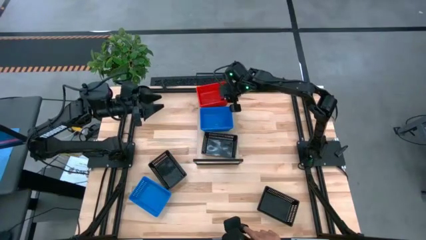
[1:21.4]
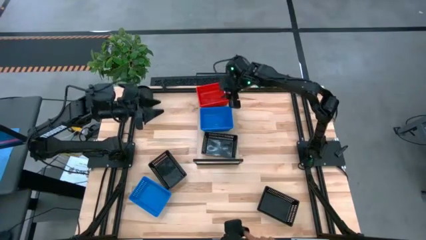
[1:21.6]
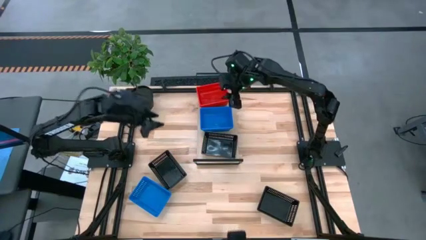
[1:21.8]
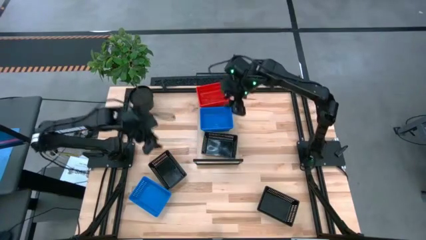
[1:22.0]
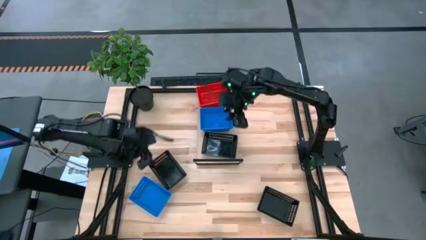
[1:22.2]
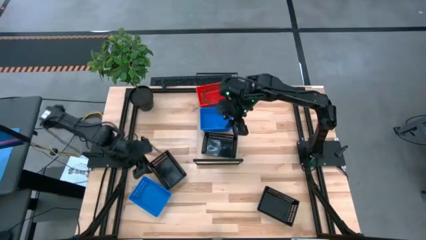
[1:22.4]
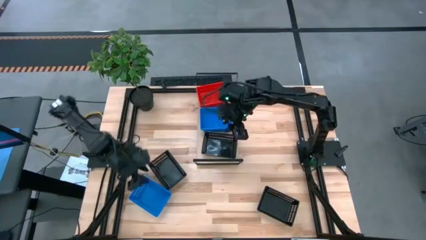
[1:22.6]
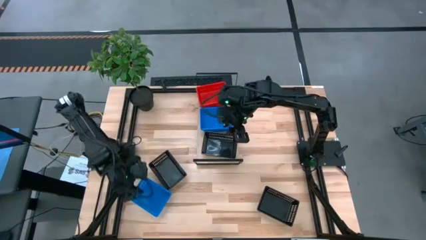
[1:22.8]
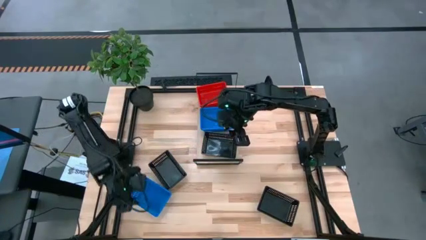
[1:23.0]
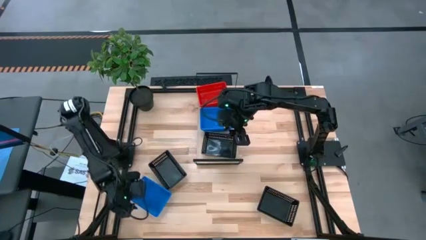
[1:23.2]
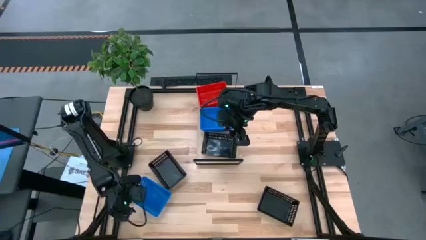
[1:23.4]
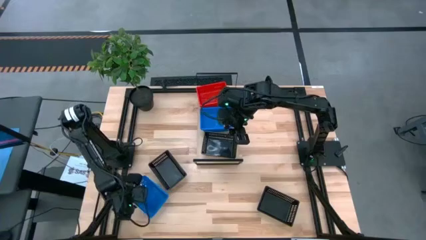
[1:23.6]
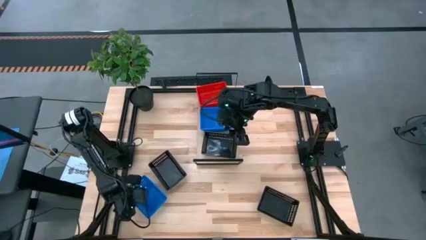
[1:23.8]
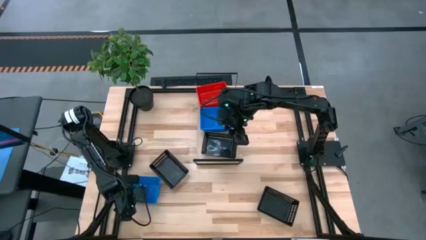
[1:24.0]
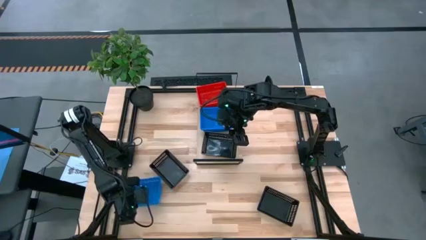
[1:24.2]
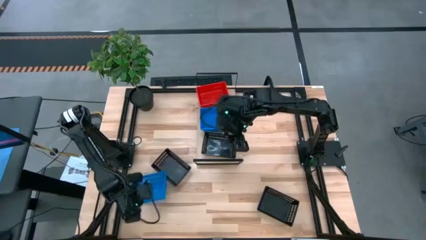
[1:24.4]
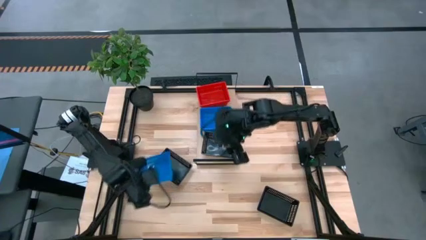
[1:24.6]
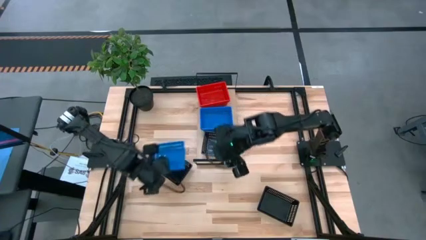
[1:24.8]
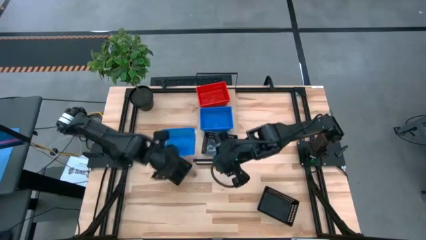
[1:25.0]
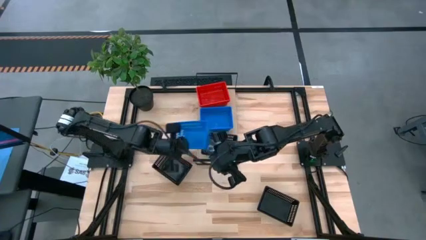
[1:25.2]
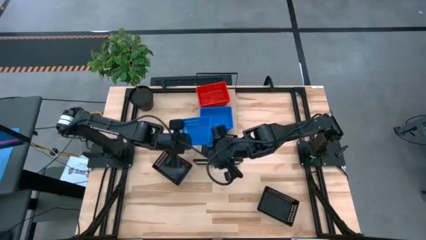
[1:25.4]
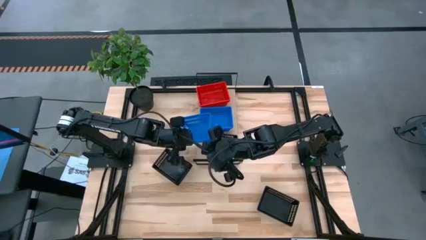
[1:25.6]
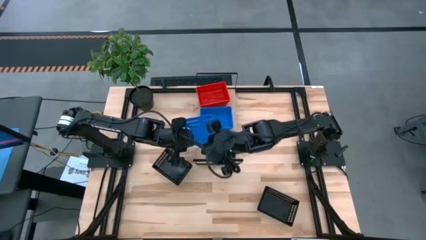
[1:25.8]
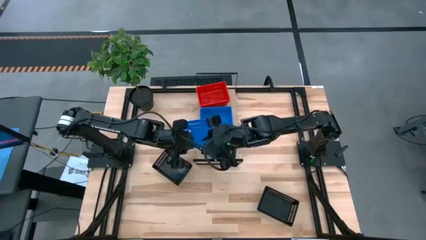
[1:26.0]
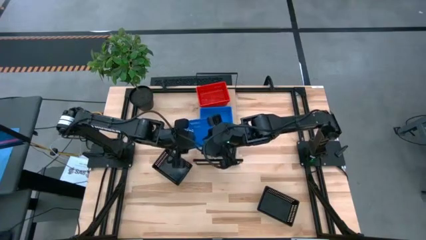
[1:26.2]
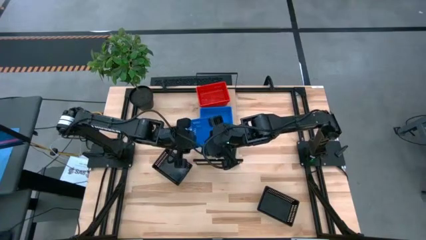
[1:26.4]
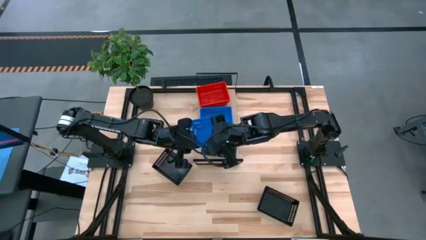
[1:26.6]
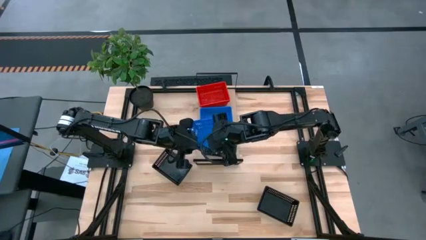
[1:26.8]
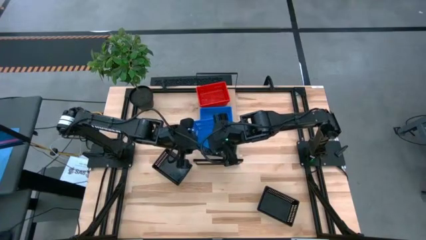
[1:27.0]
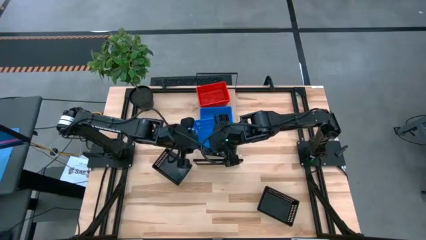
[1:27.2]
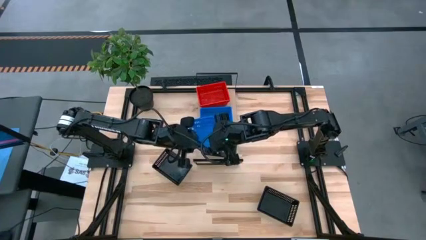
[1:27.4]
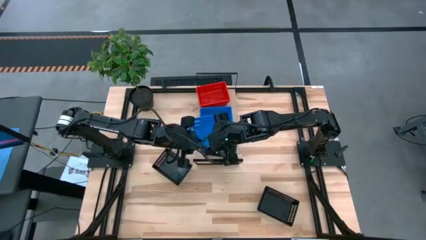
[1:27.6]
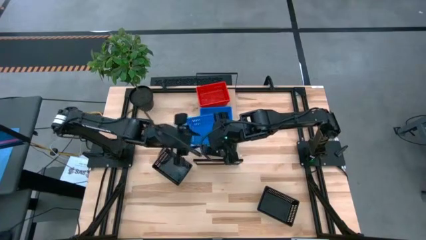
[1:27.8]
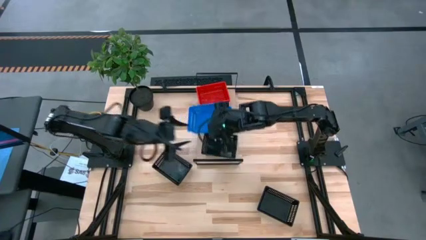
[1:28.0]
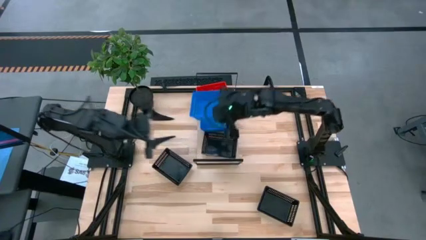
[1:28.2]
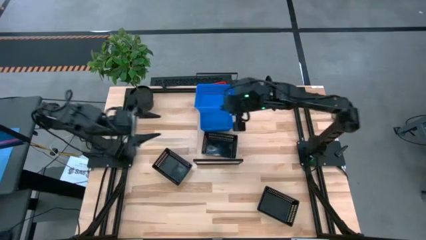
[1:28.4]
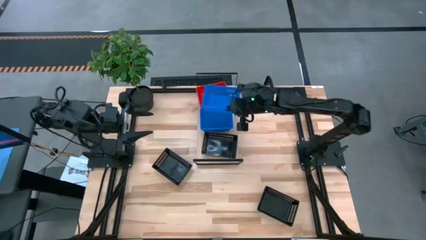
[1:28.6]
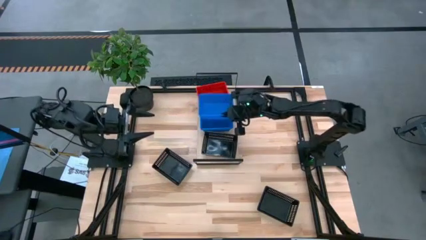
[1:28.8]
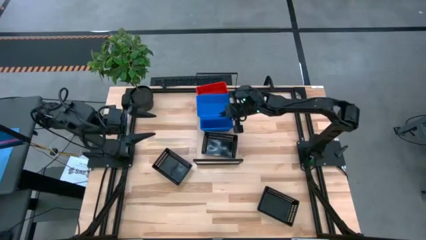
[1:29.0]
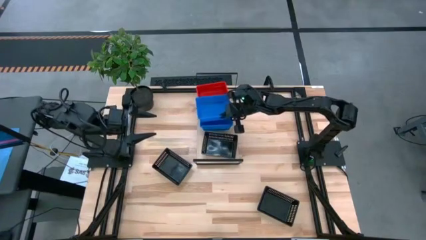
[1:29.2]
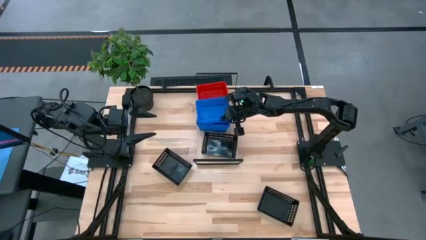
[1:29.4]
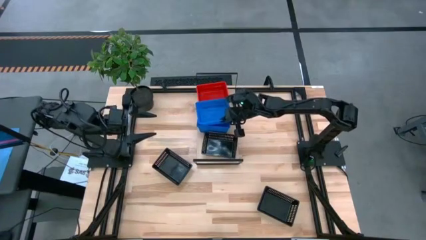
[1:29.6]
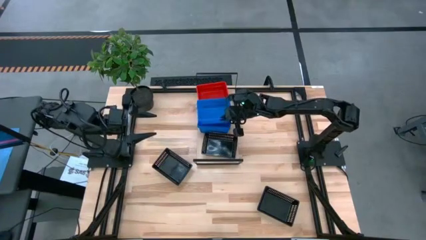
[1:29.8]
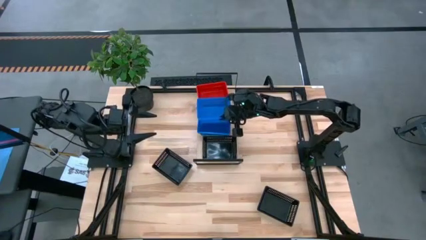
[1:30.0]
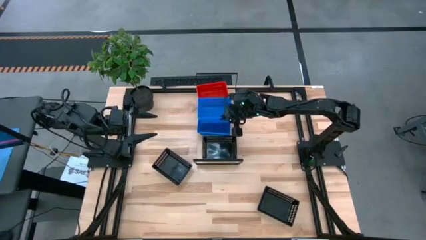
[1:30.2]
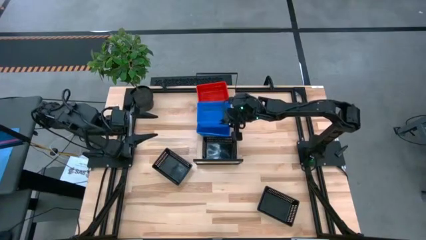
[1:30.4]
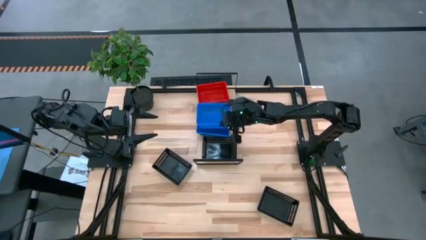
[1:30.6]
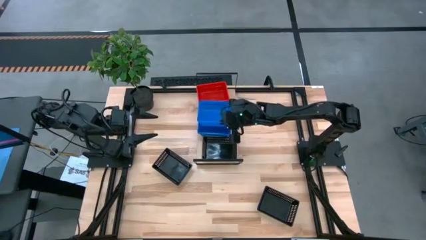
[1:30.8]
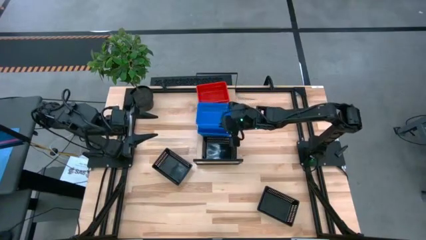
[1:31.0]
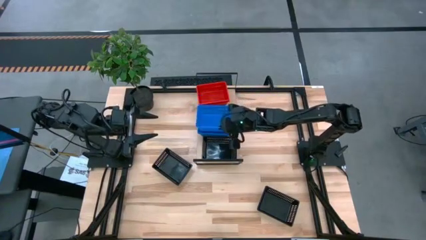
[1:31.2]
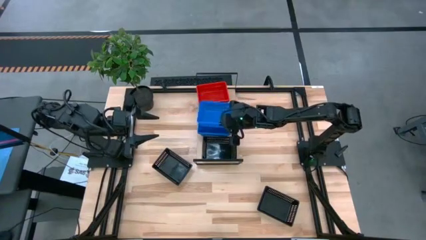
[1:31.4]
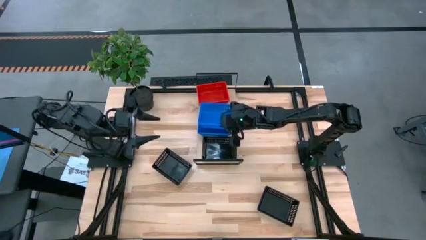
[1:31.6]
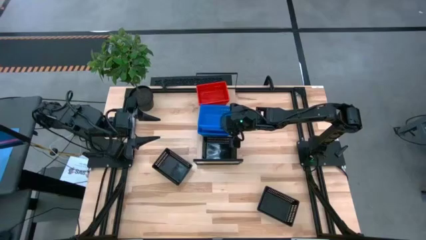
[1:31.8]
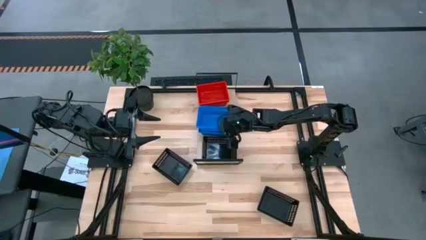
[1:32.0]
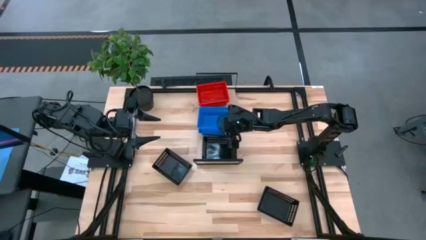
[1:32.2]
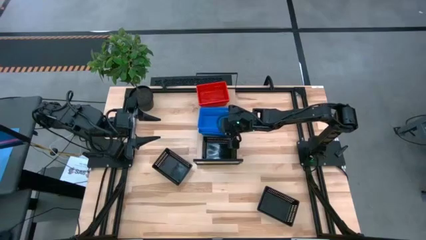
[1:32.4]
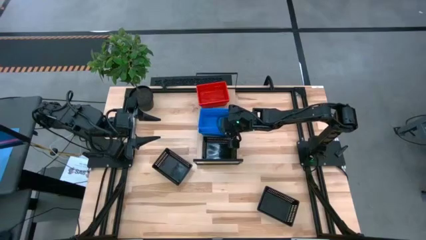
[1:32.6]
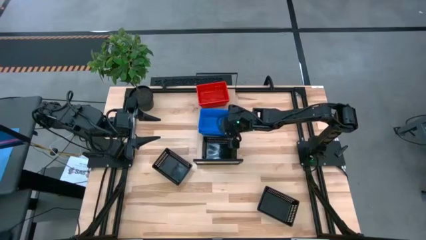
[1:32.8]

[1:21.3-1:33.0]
Task: Stack baskets on shelf by color
Stack the blue bin on the blue bin on the shelf
